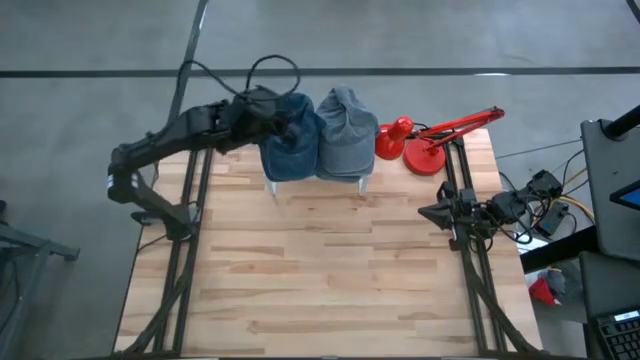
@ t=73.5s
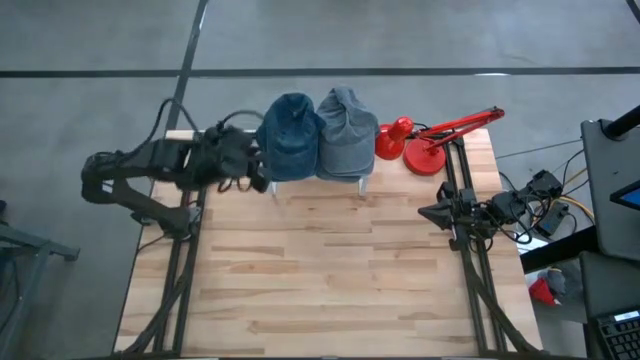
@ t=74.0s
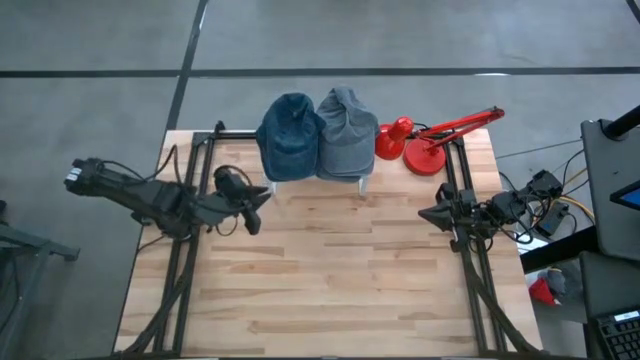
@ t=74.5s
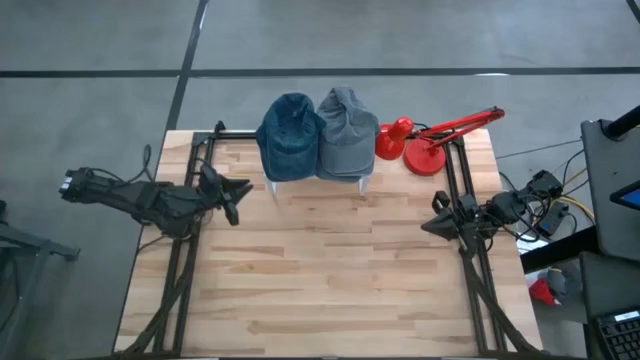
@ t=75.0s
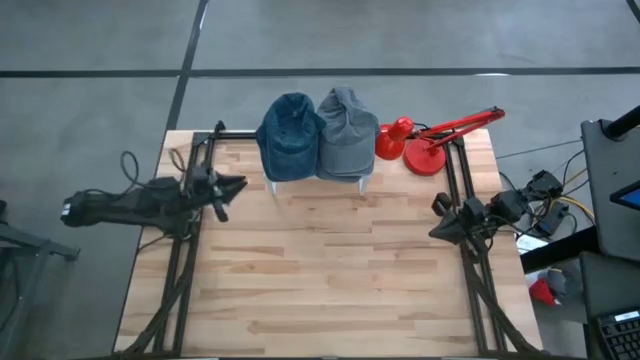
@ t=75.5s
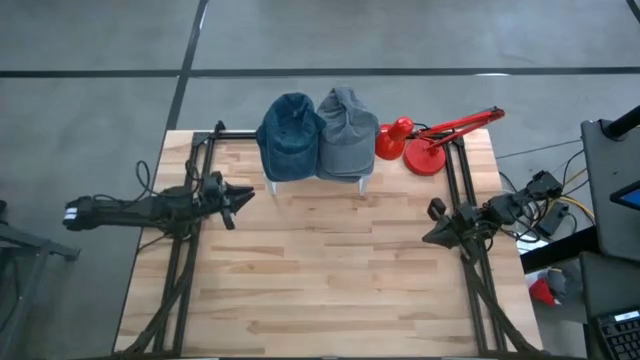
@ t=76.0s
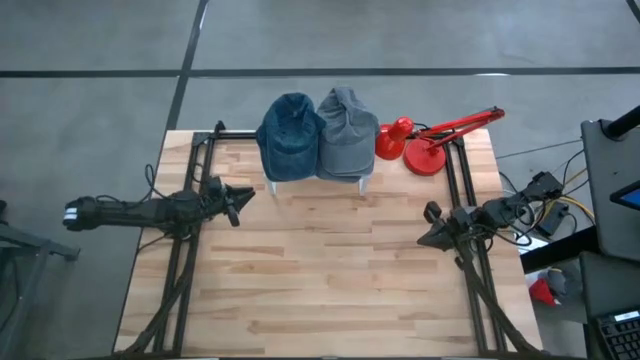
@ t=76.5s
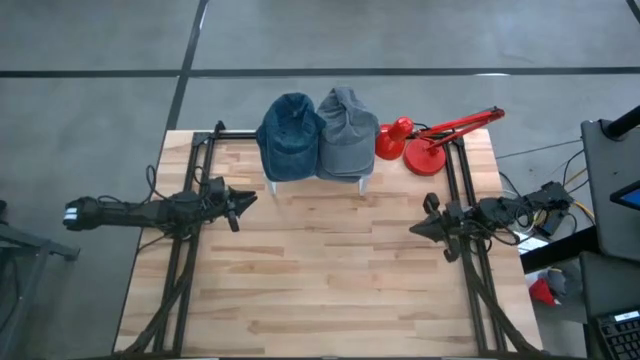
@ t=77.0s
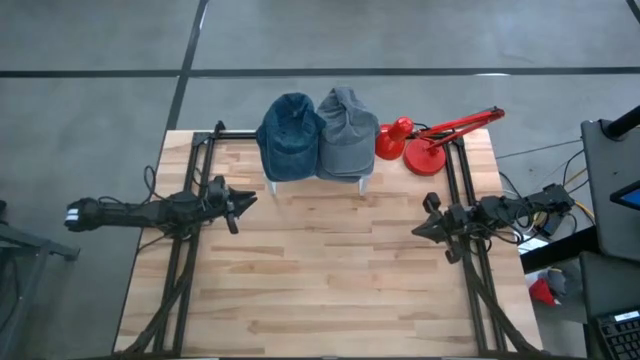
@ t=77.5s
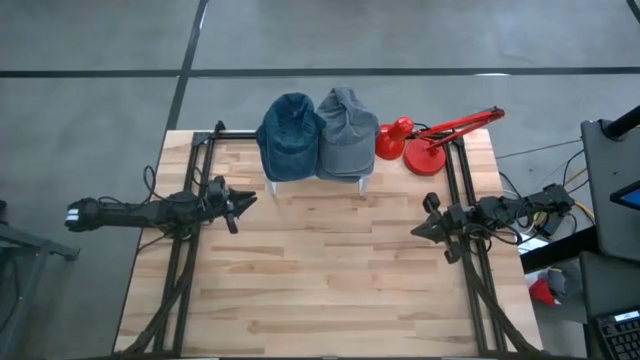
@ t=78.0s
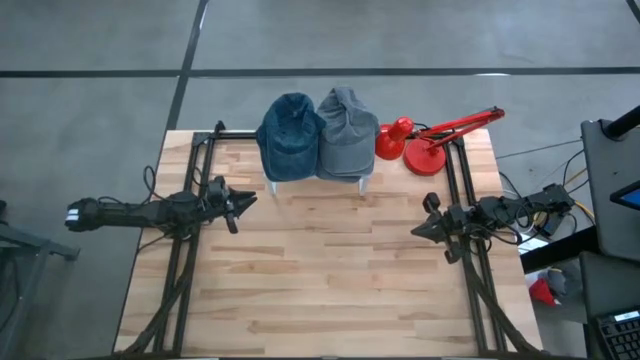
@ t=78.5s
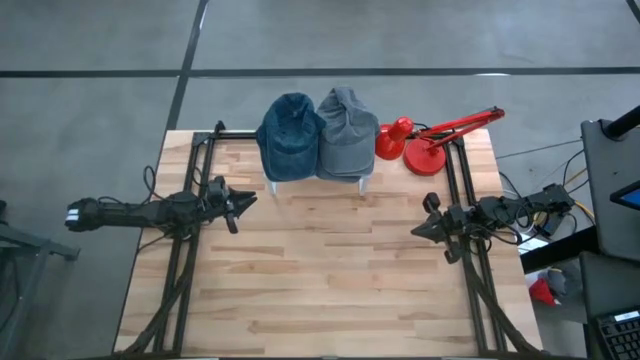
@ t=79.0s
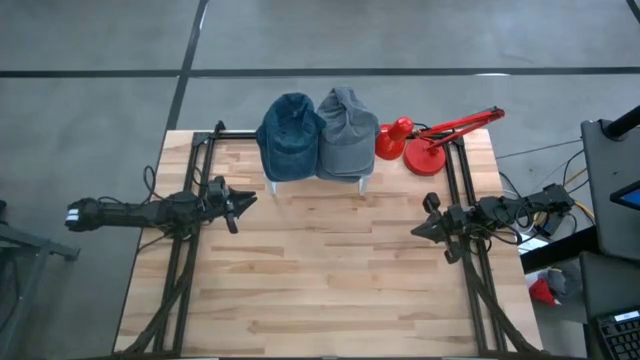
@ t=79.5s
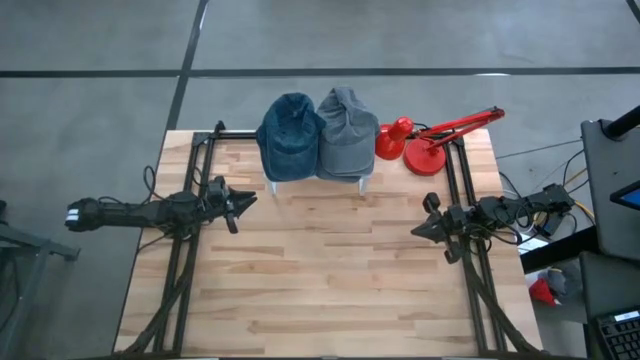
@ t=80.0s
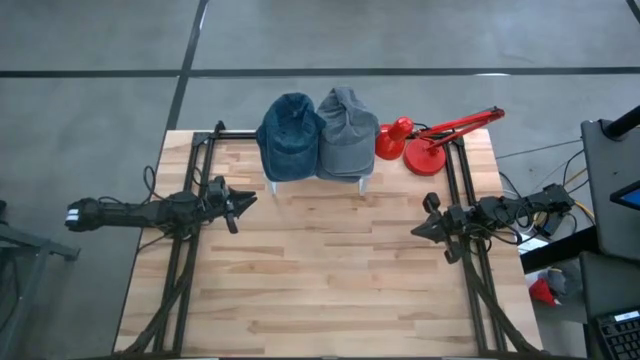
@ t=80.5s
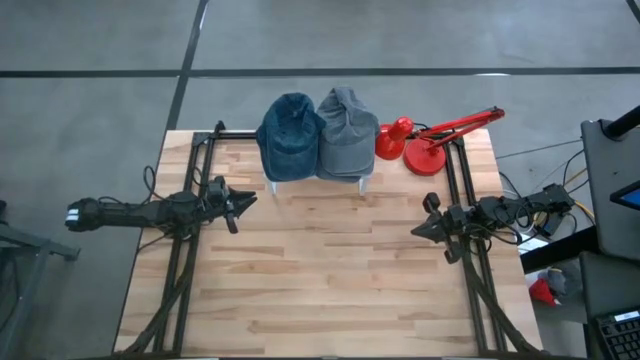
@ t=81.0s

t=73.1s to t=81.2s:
Task: Pick & Place hat
Return to Home Position

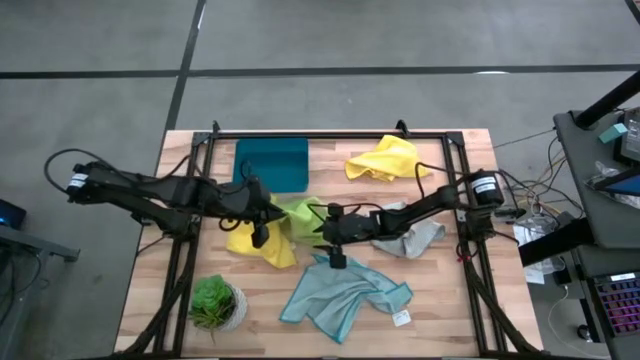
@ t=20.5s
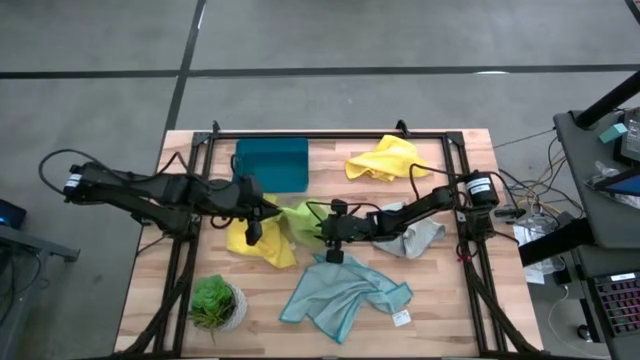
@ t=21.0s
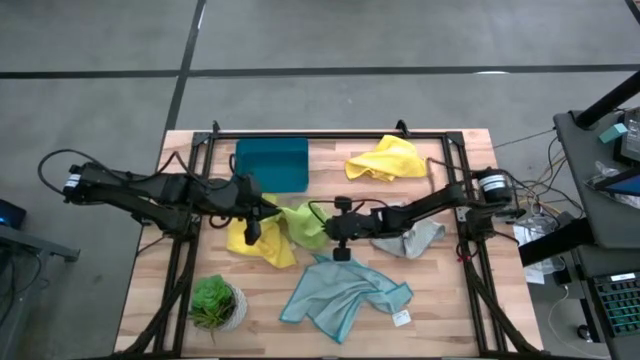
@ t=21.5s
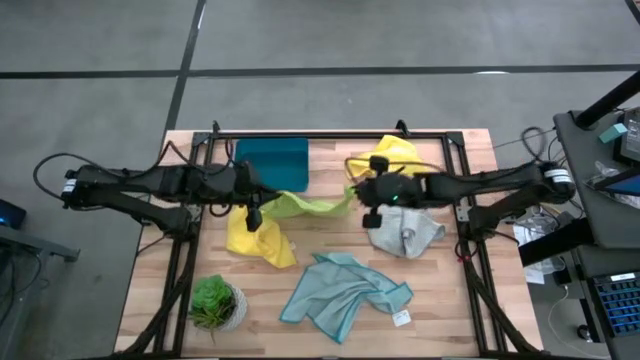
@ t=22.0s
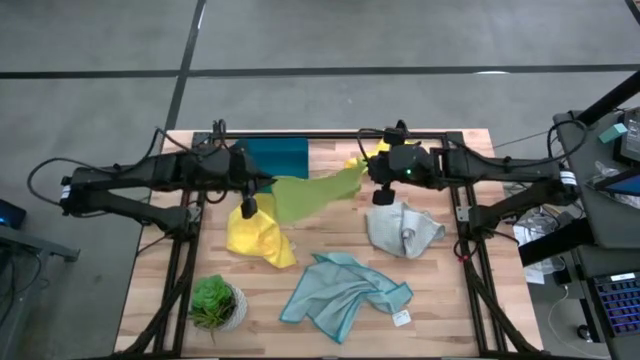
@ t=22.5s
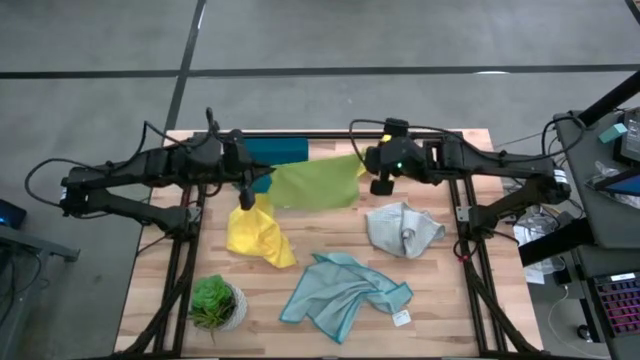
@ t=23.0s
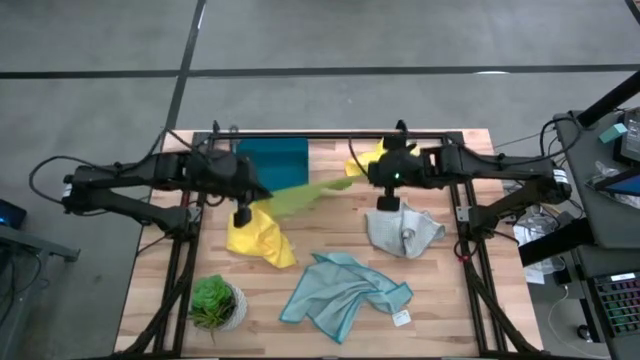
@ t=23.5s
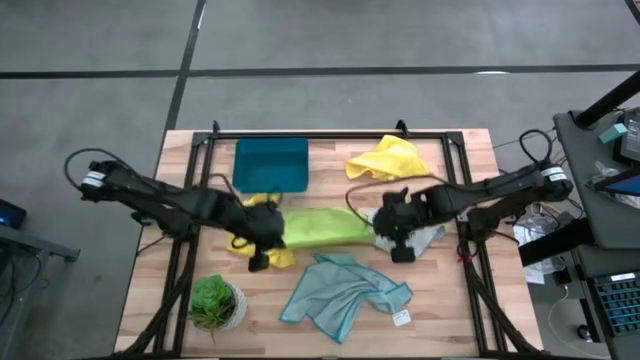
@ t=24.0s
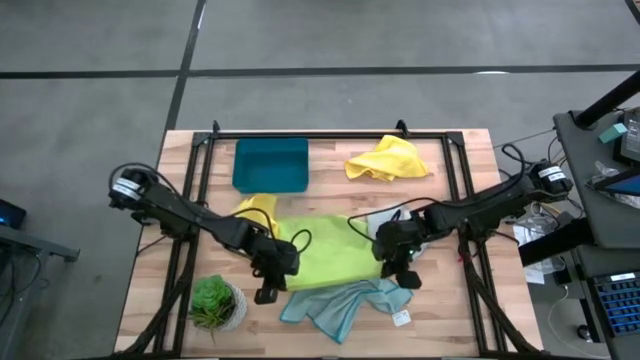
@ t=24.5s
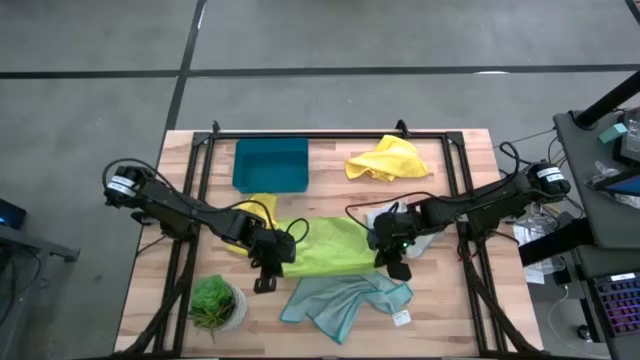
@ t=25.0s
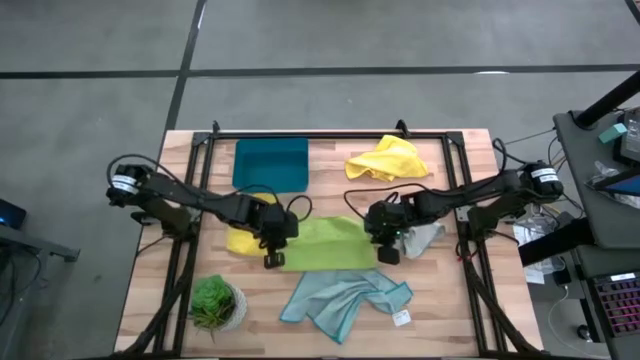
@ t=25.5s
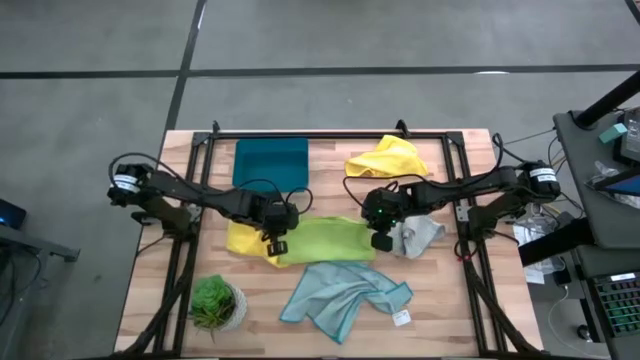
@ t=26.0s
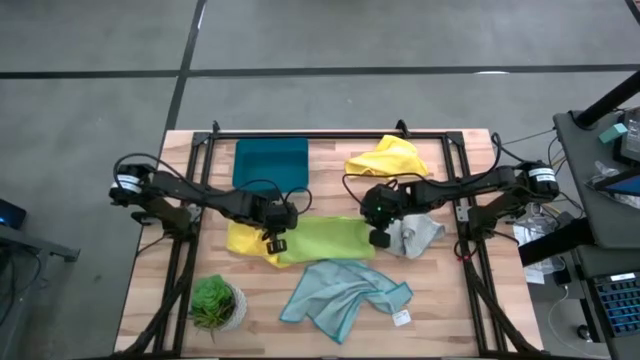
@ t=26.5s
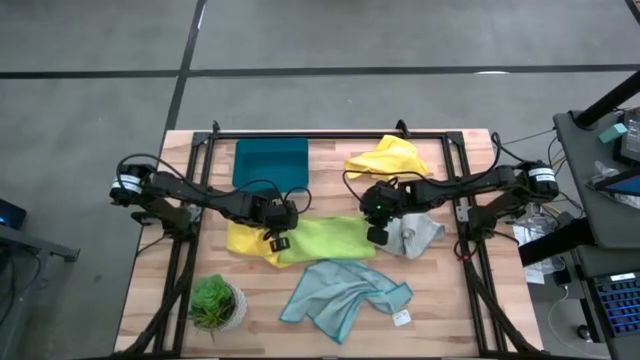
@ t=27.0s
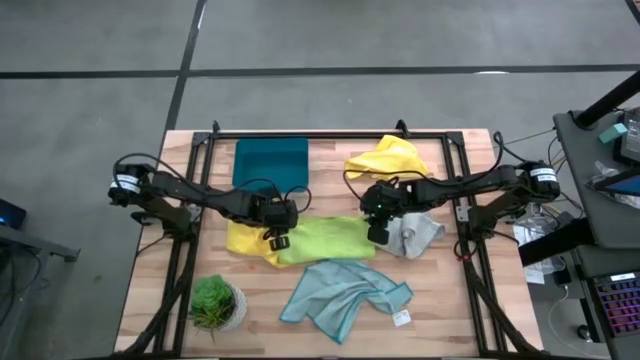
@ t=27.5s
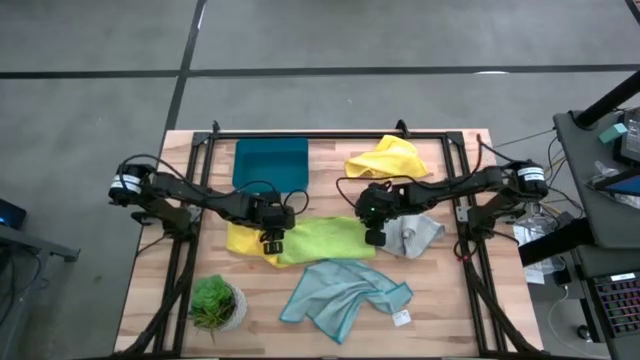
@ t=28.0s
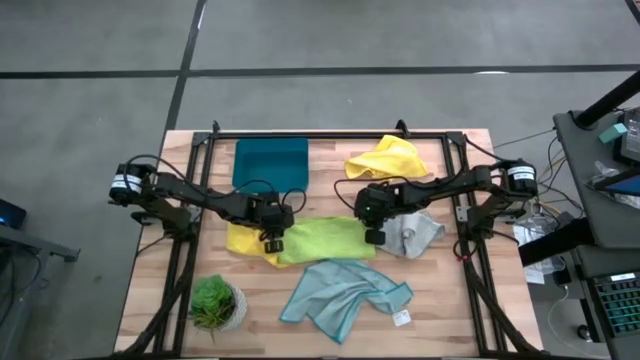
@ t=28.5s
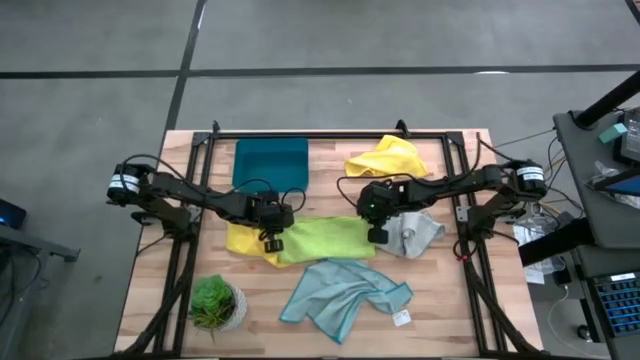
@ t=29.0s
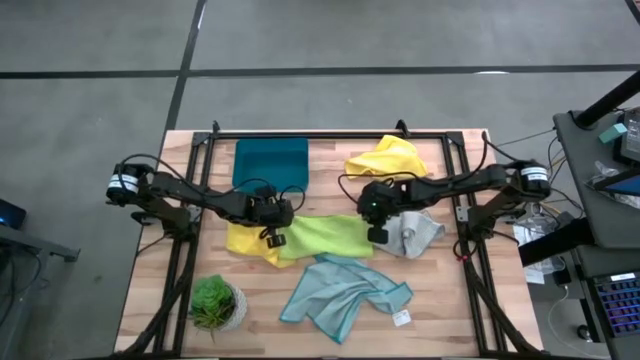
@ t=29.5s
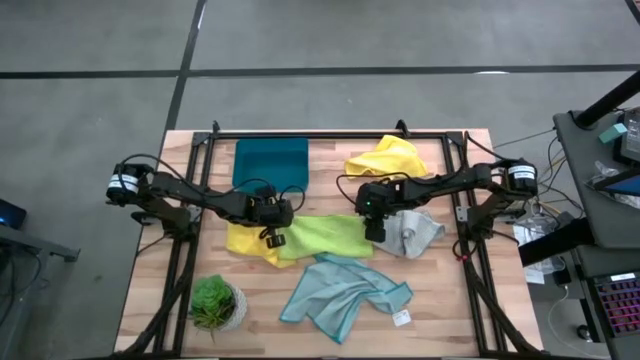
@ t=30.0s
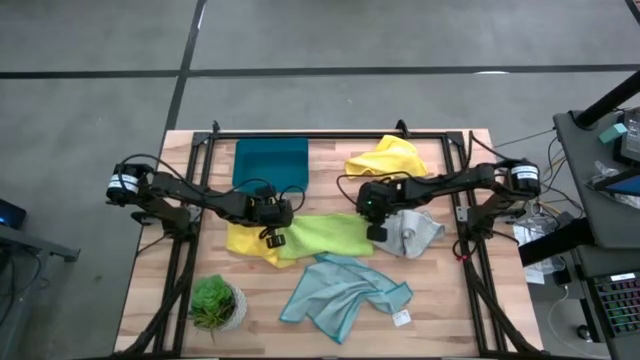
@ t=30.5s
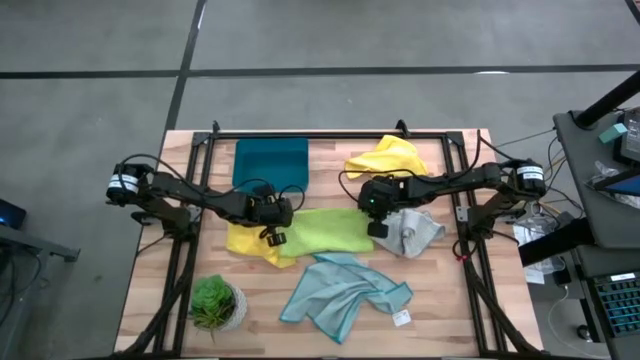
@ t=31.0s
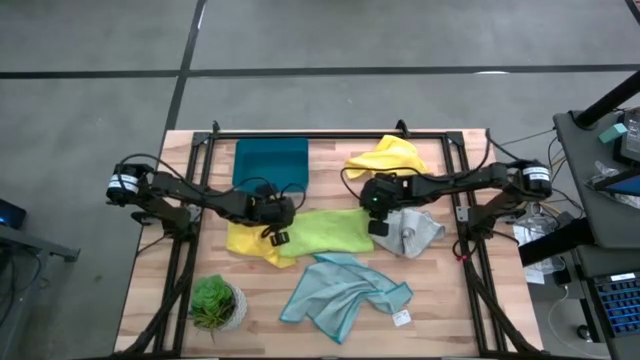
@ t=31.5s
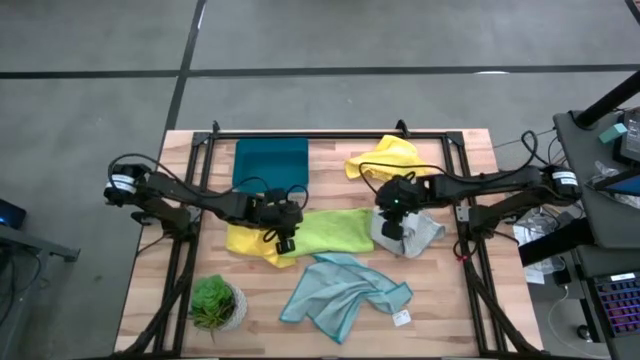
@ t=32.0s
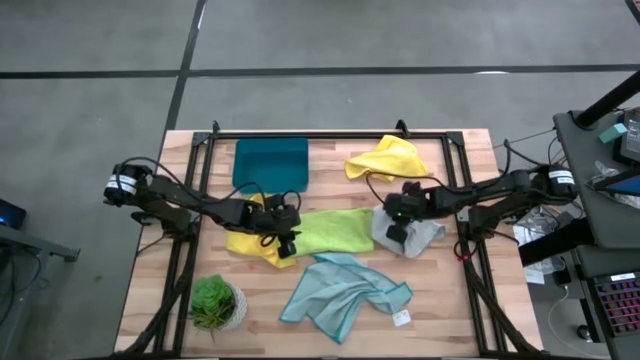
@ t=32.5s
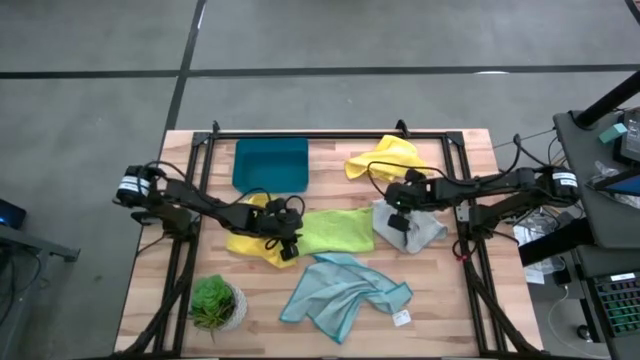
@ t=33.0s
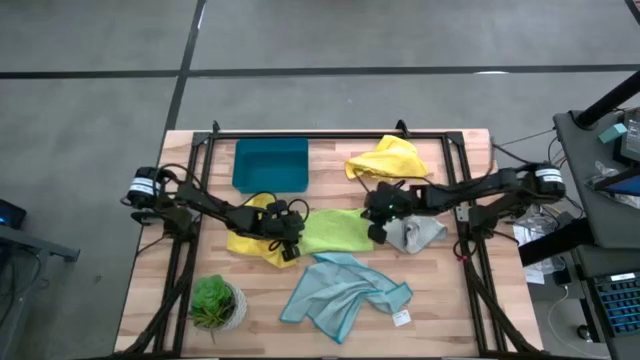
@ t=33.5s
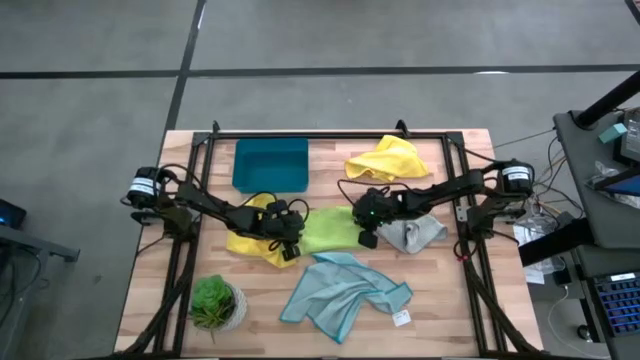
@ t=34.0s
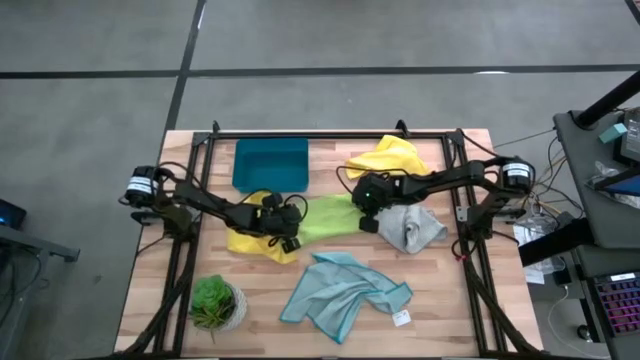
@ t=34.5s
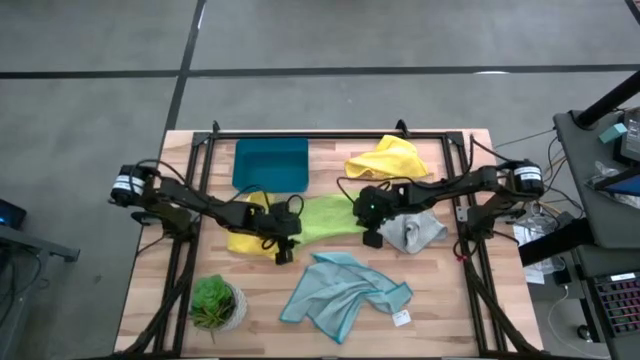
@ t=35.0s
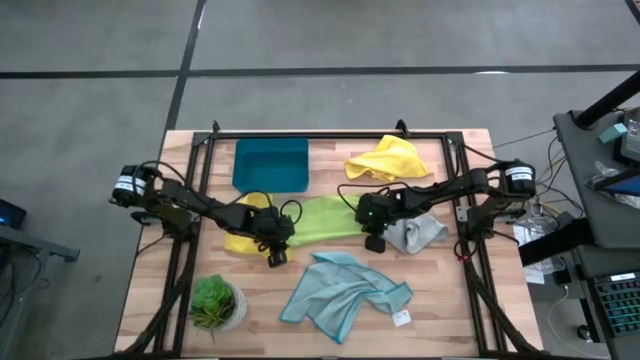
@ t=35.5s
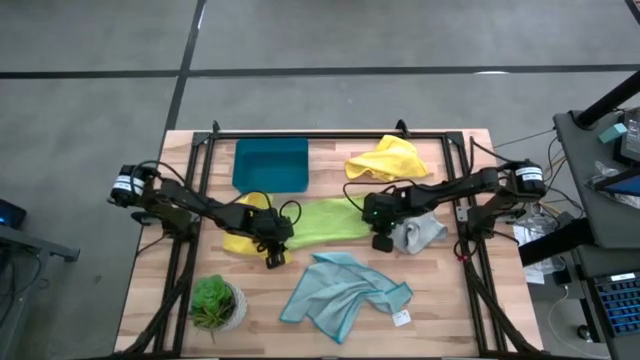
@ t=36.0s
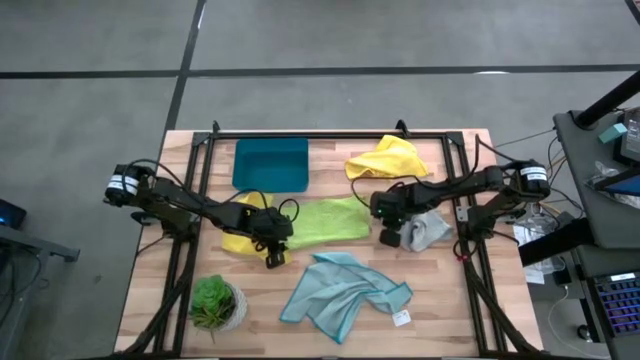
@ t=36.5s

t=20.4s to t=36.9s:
Task: Fold microfiber towels
Fold the green microfiber towel
